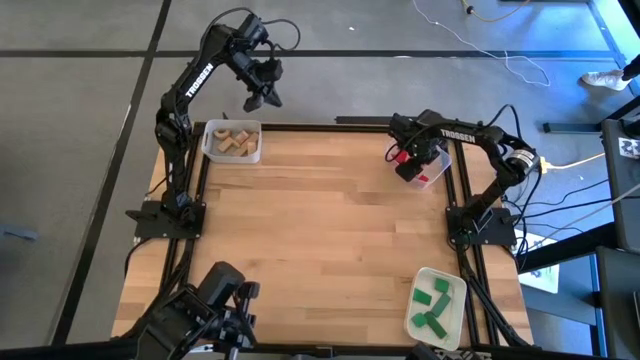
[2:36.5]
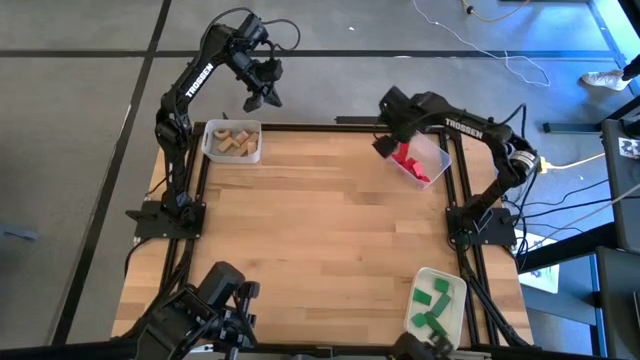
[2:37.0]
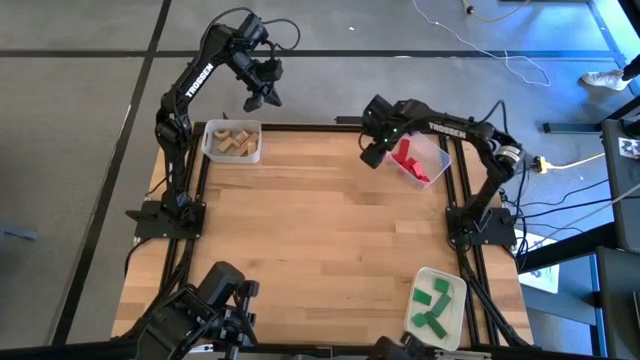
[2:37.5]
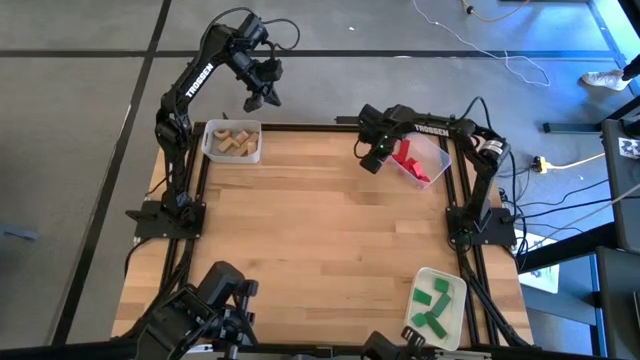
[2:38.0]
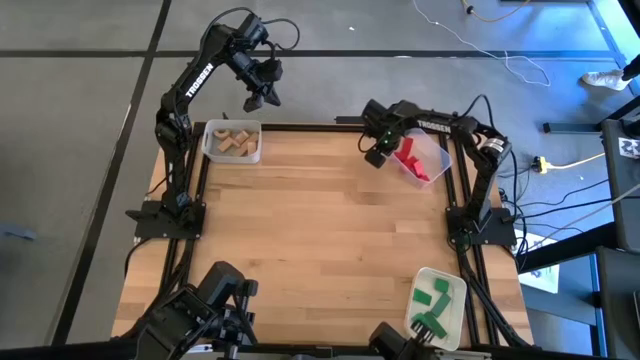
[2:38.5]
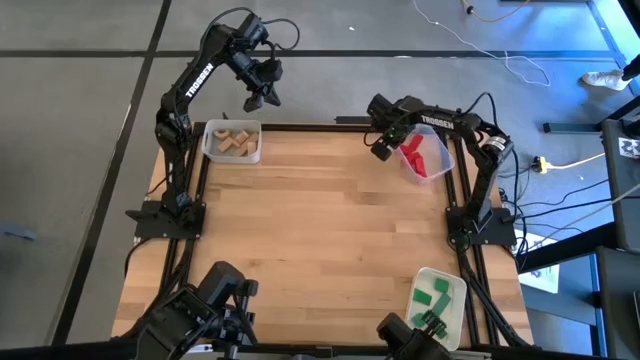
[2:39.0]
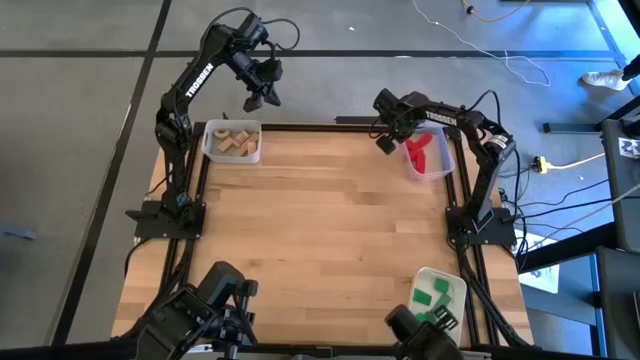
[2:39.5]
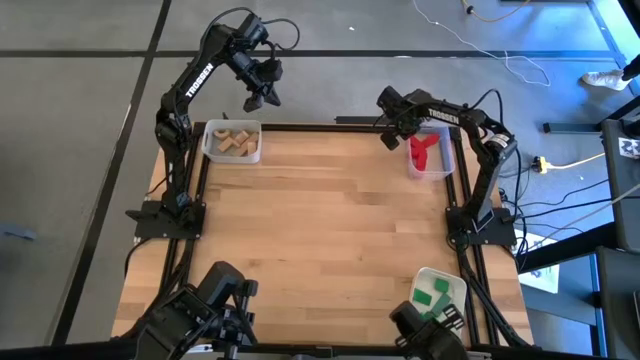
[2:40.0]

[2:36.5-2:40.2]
Task: Sort & place blocks by color
Adjust the transparent bin

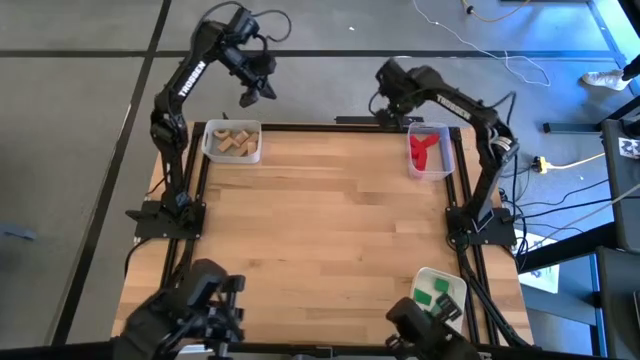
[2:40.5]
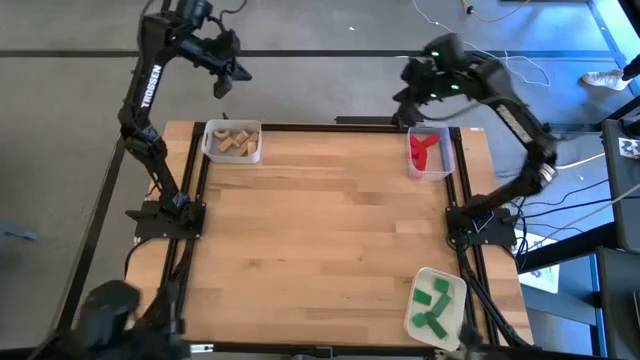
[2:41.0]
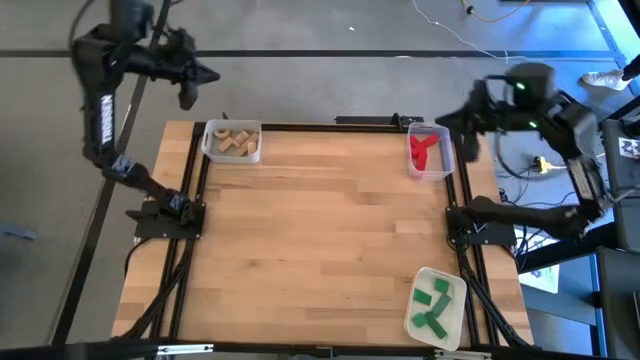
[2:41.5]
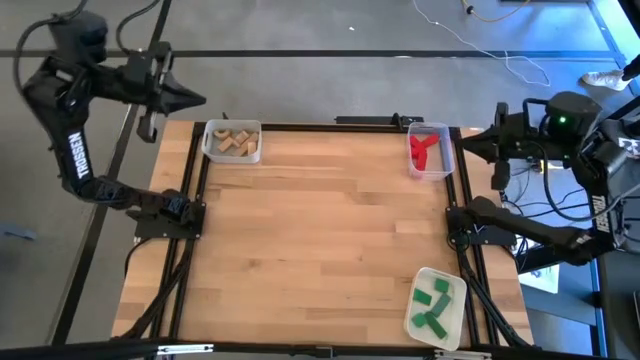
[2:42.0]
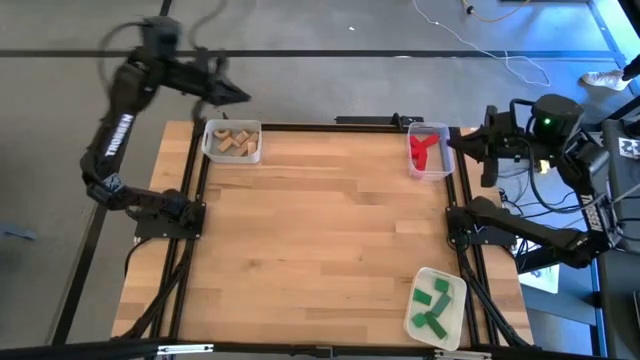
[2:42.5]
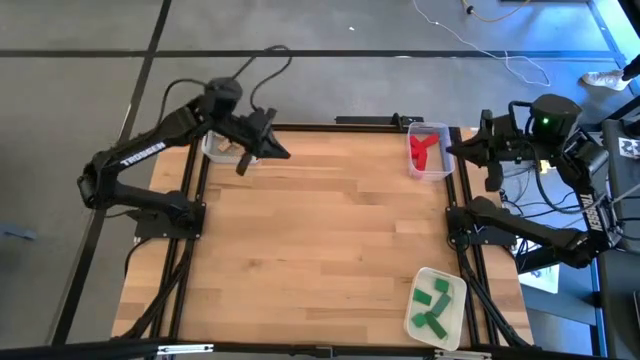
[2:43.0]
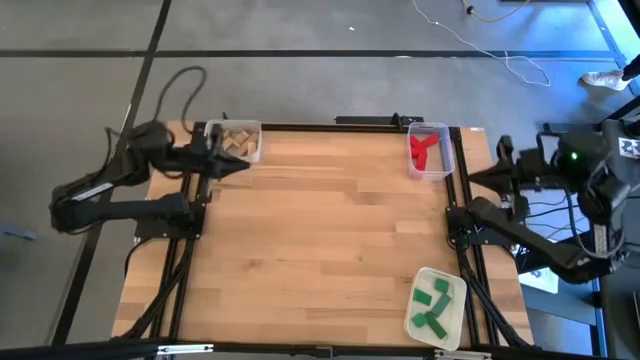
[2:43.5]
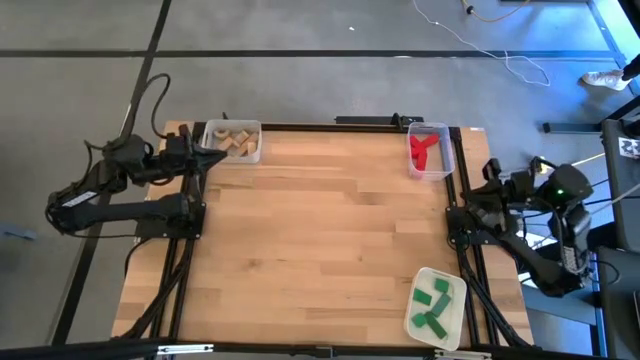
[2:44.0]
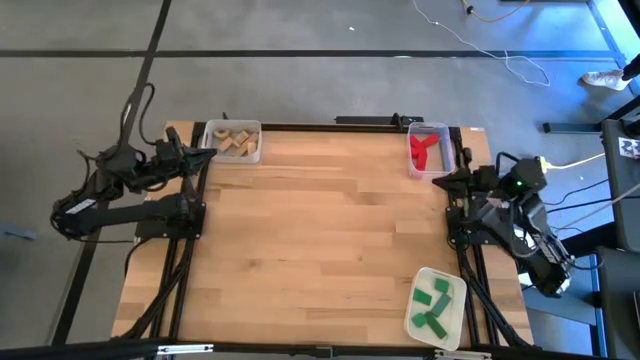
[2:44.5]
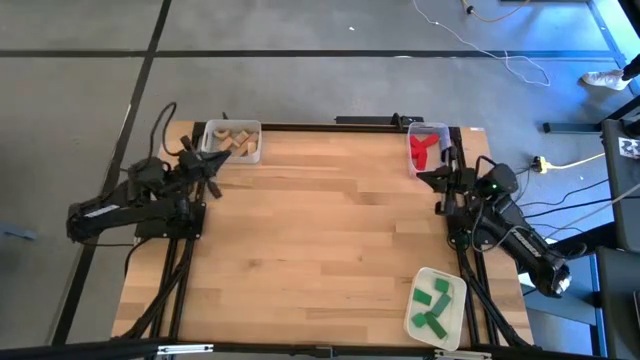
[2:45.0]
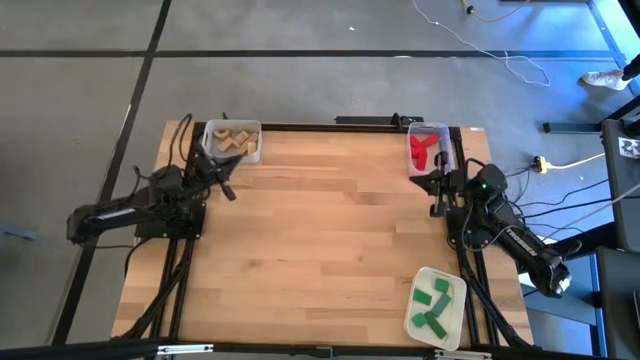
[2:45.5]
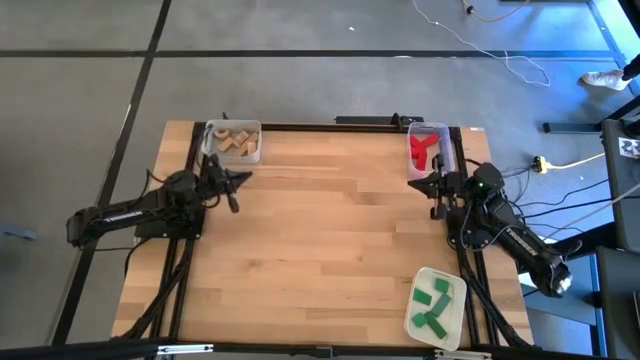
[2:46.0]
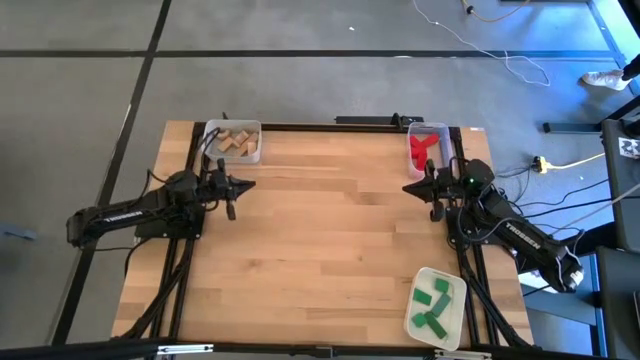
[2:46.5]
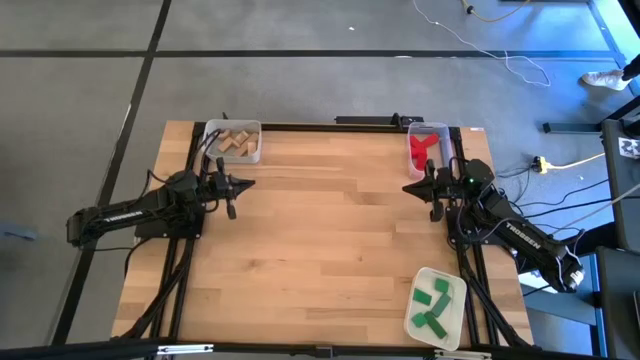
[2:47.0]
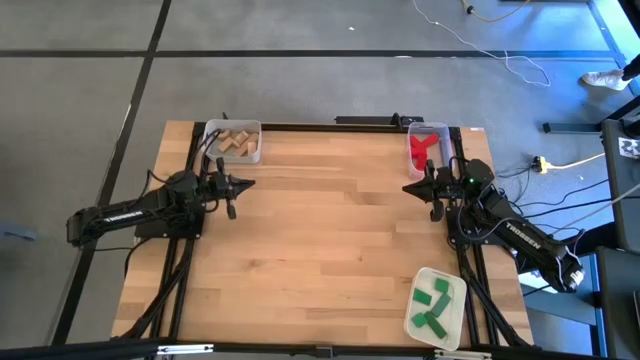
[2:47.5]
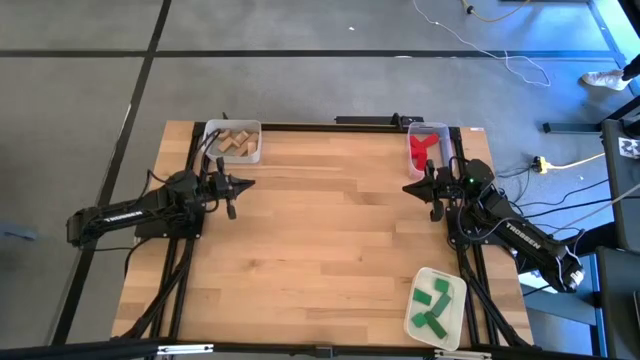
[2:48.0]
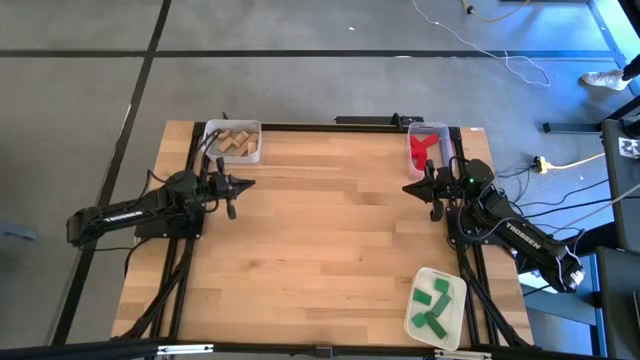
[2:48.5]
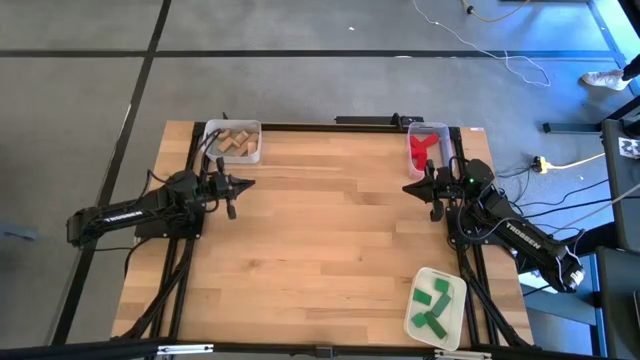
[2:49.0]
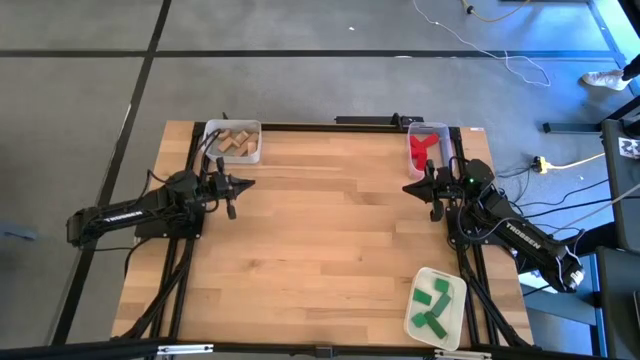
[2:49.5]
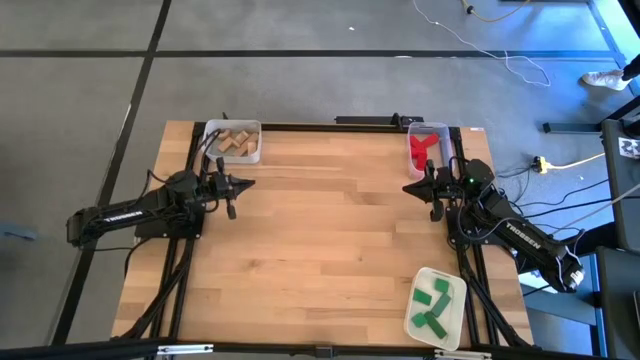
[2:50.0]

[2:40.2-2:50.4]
Return to Home Position
